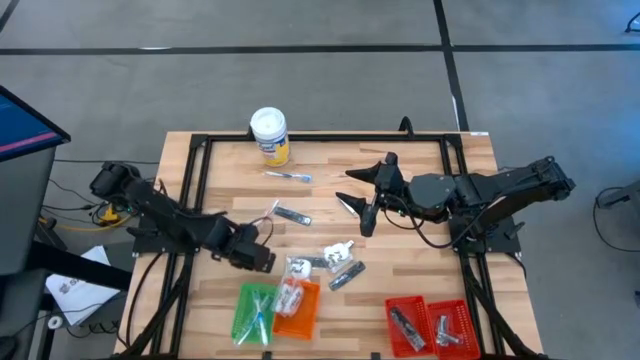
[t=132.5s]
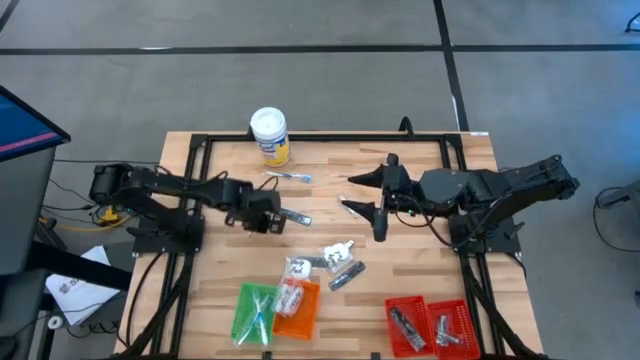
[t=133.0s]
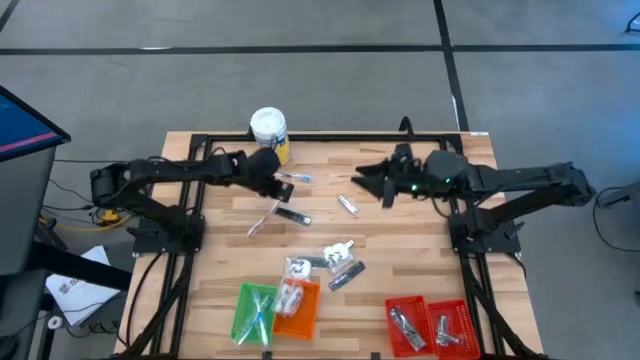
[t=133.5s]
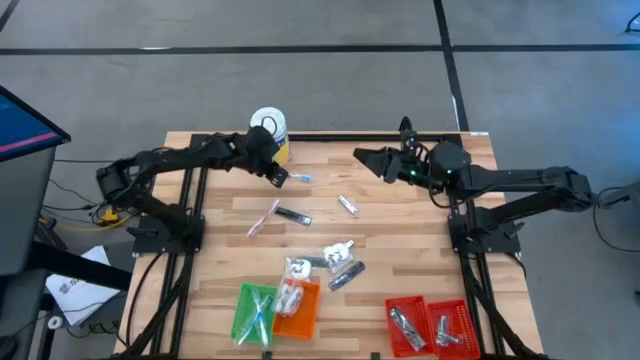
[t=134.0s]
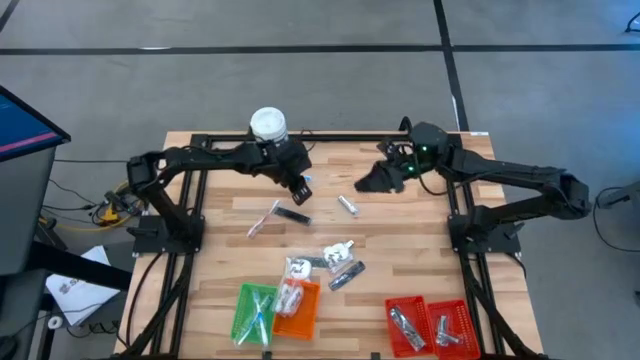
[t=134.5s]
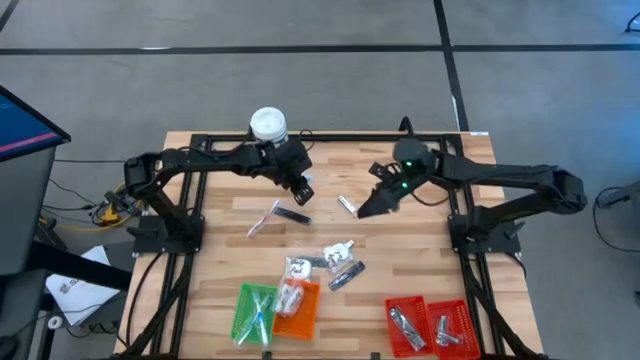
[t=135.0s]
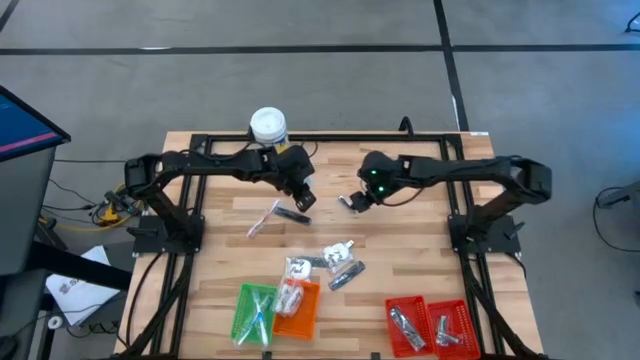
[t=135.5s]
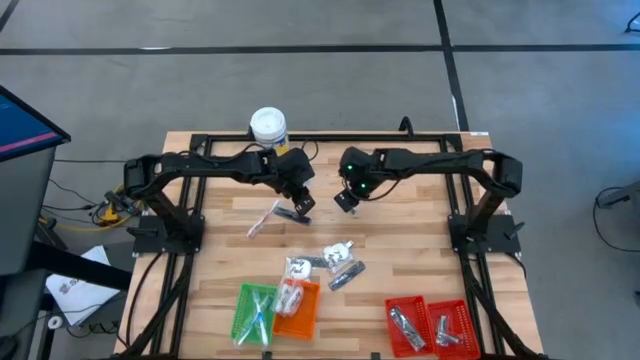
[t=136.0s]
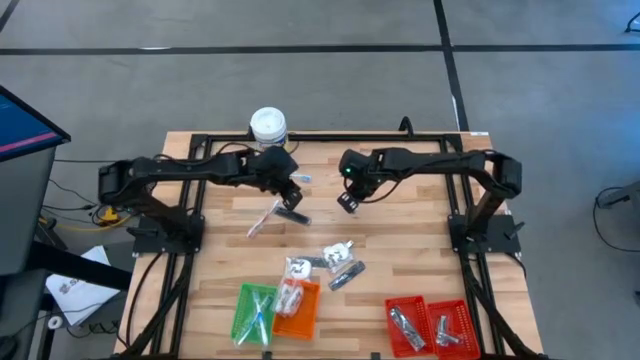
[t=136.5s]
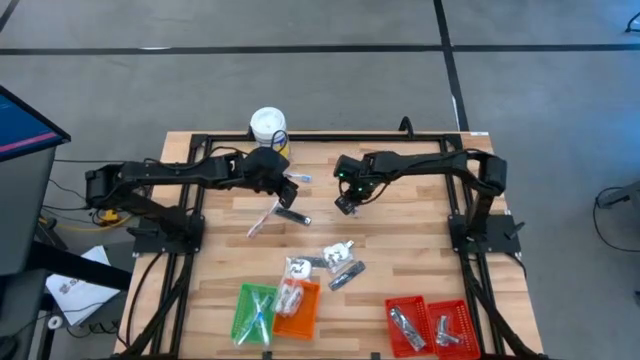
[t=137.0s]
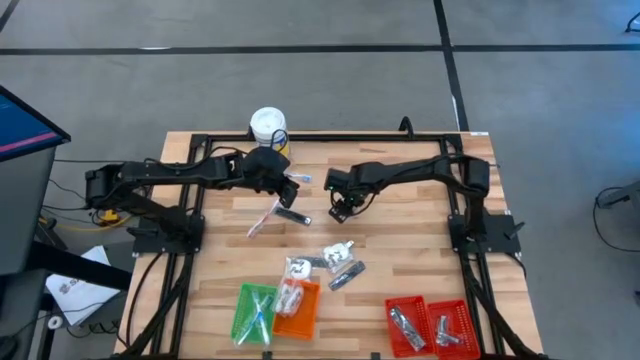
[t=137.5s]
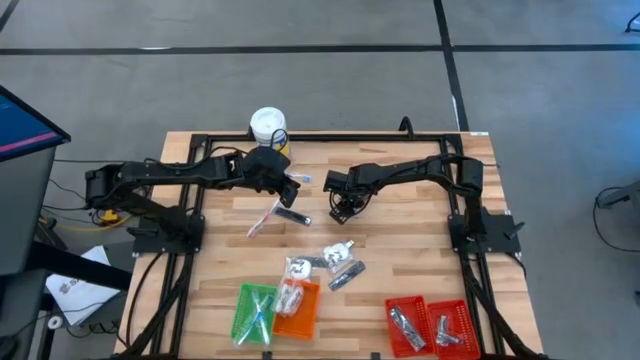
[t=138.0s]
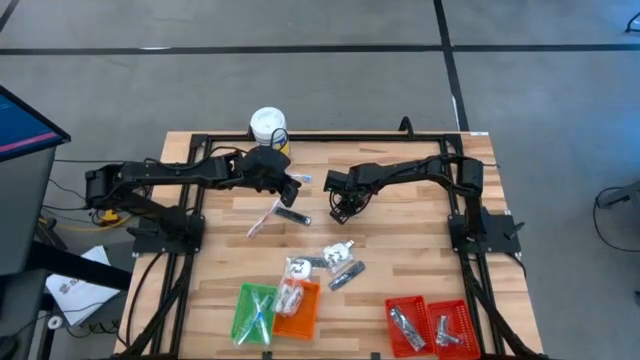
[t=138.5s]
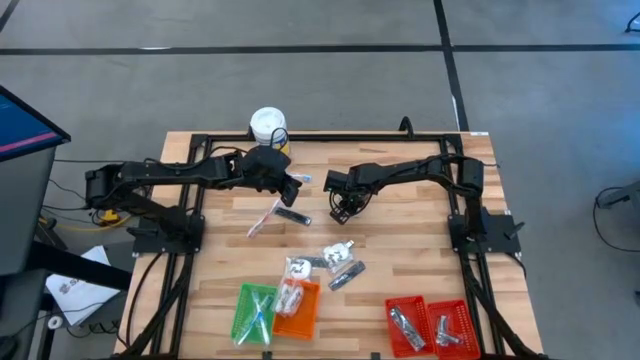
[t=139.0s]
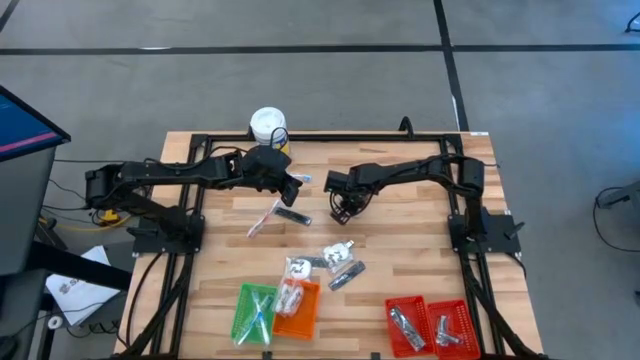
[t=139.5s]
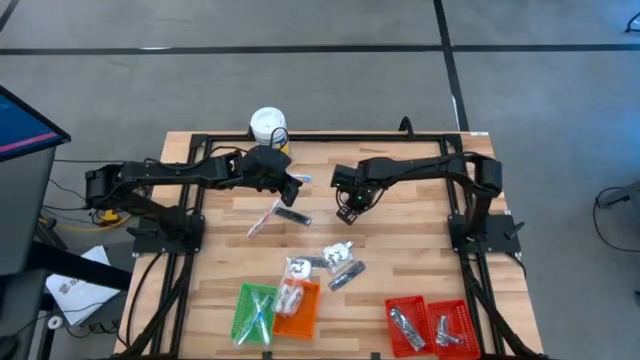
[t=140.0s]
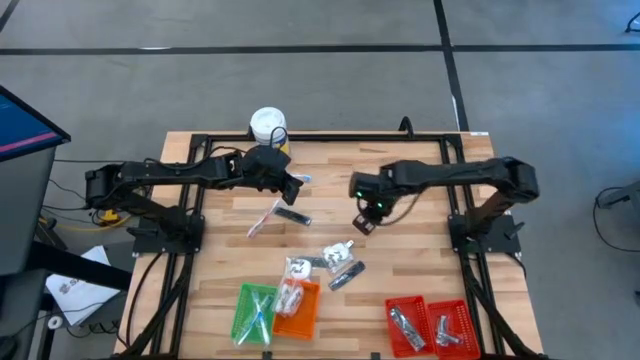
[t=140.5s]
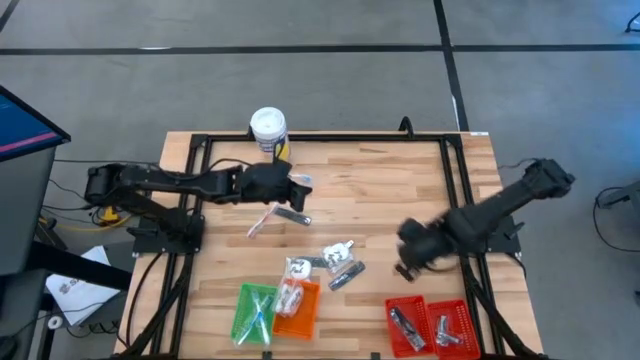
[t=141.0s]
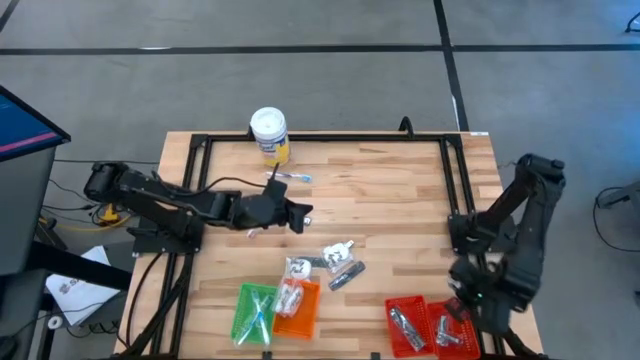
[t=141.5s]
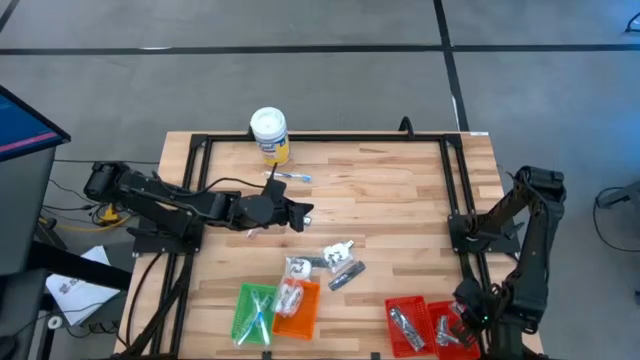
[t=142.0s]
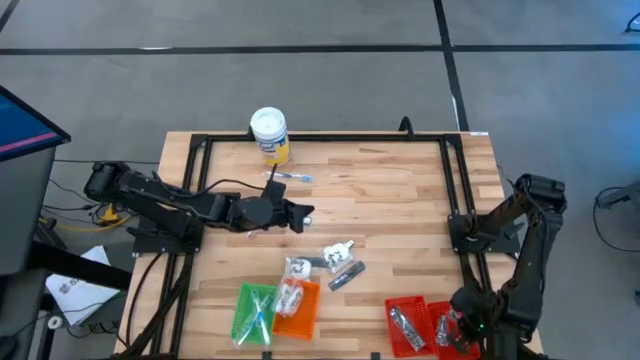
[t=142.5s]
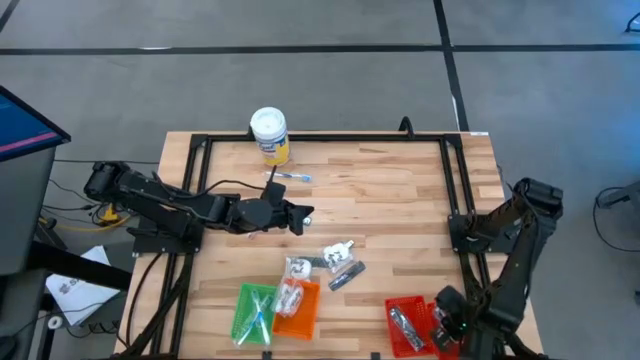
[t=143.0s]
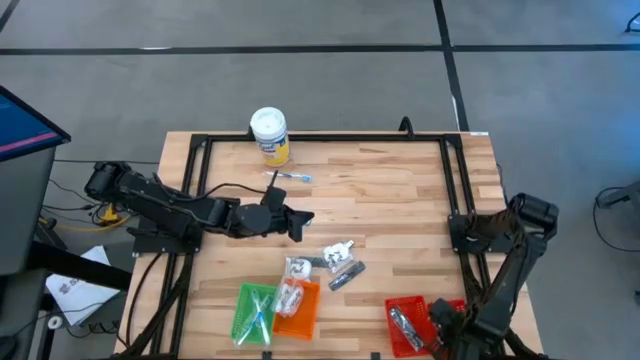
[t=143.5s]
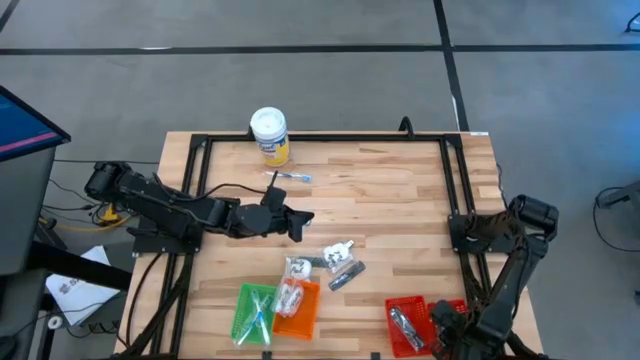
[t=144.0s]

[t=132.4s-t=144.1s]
Task: Pick & Place Travel size toiletries
Put the silver nail cutter into the right red basket

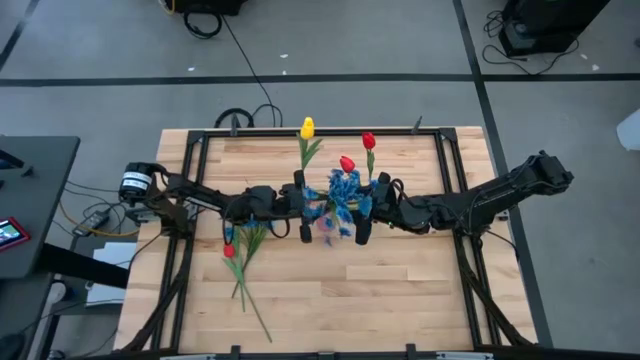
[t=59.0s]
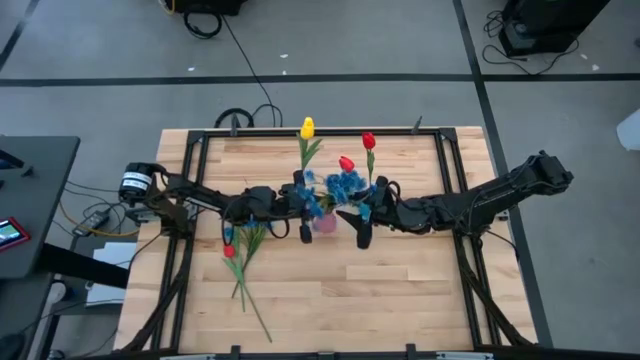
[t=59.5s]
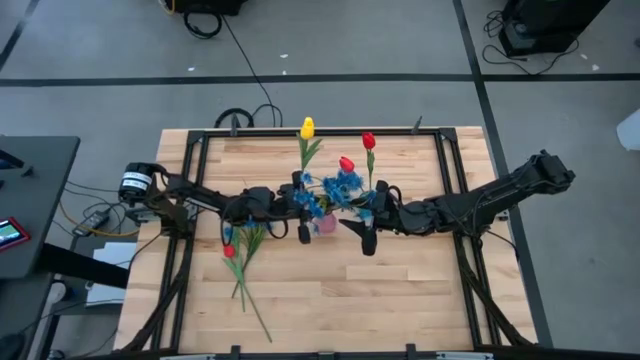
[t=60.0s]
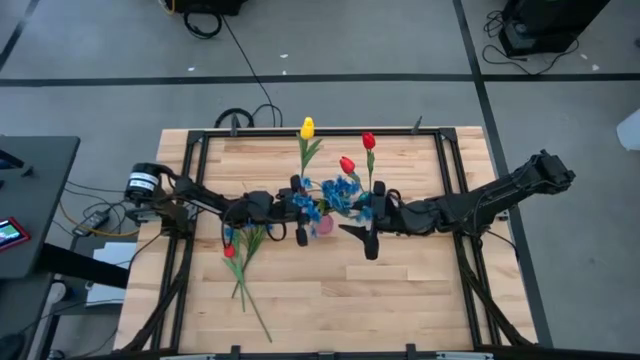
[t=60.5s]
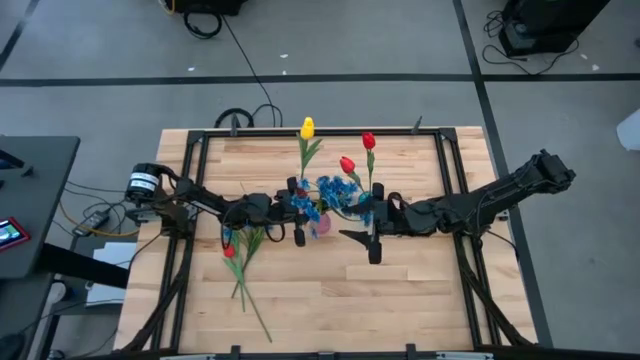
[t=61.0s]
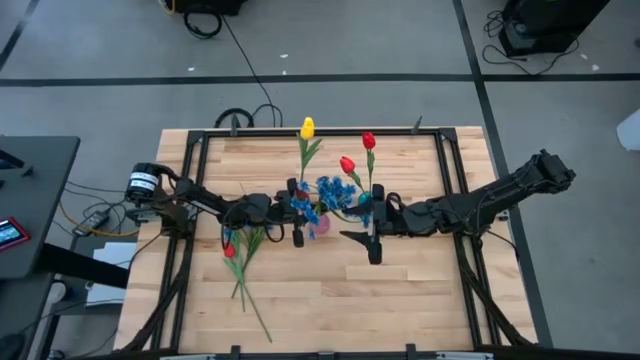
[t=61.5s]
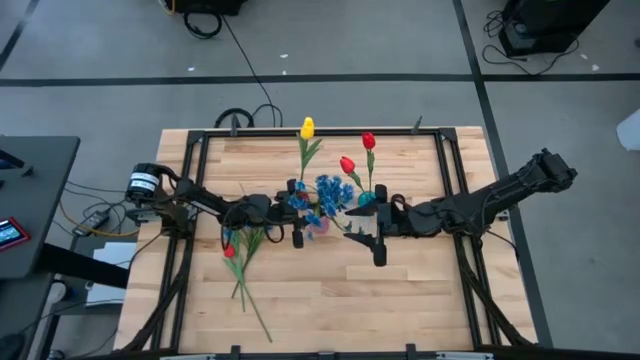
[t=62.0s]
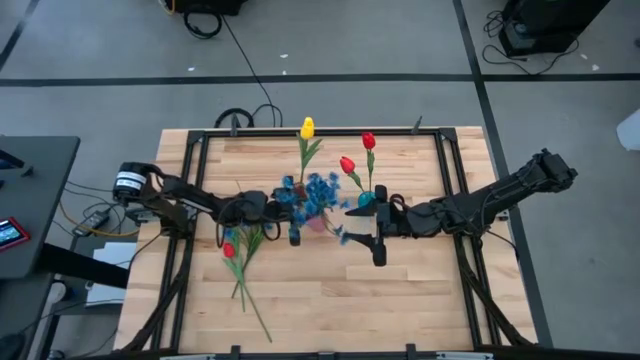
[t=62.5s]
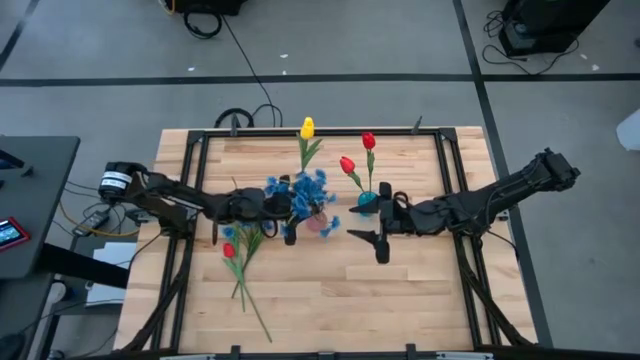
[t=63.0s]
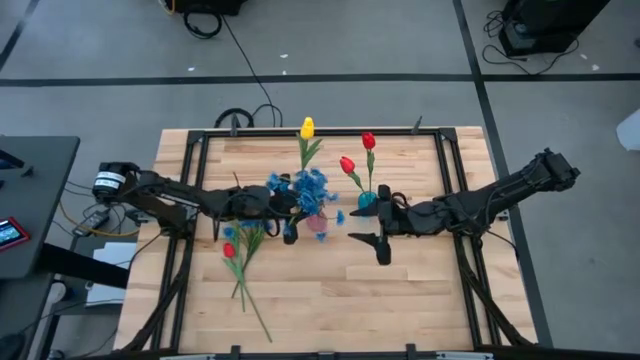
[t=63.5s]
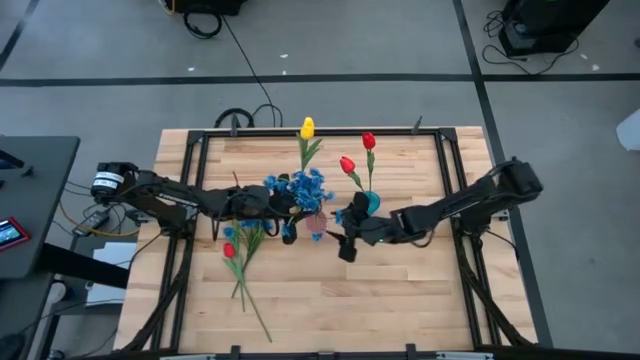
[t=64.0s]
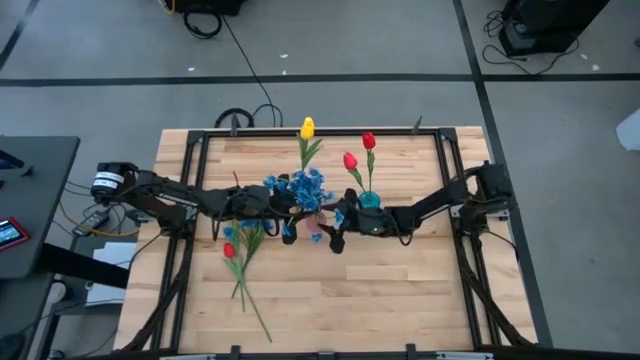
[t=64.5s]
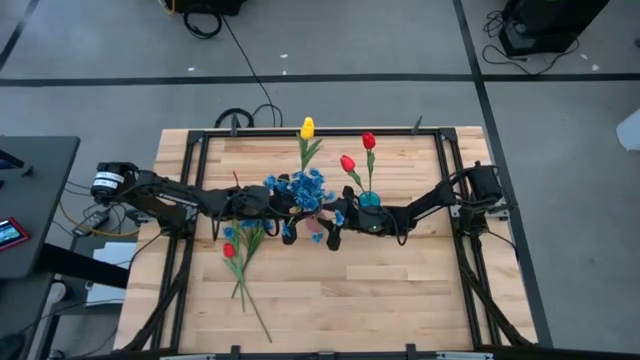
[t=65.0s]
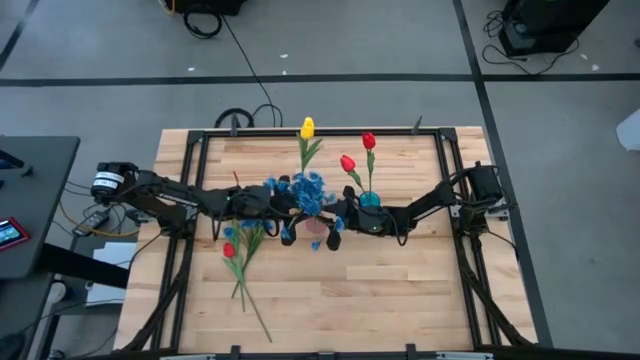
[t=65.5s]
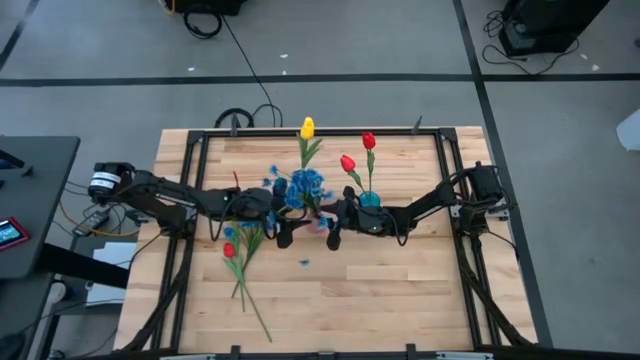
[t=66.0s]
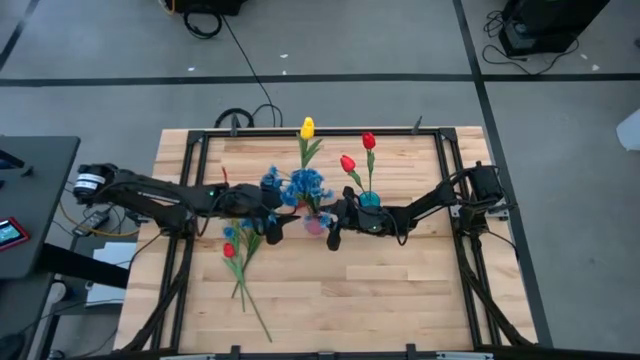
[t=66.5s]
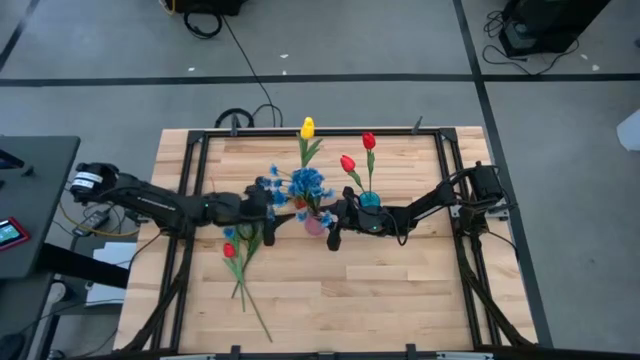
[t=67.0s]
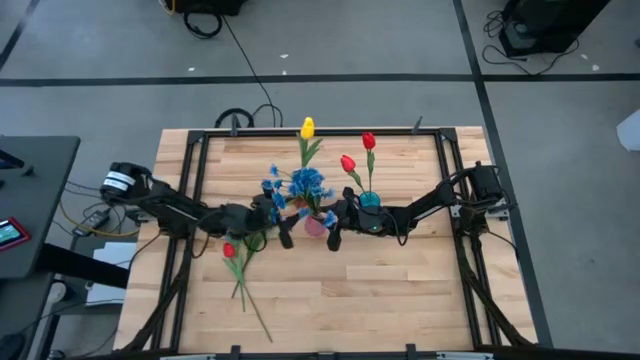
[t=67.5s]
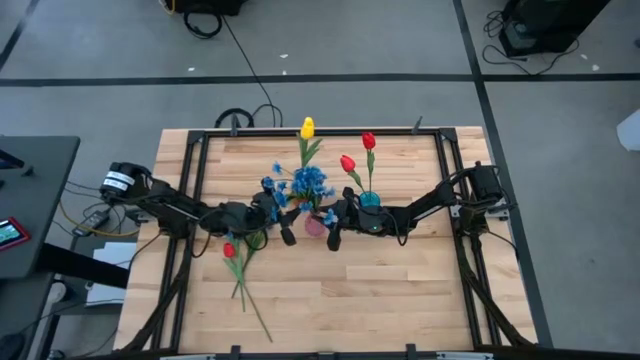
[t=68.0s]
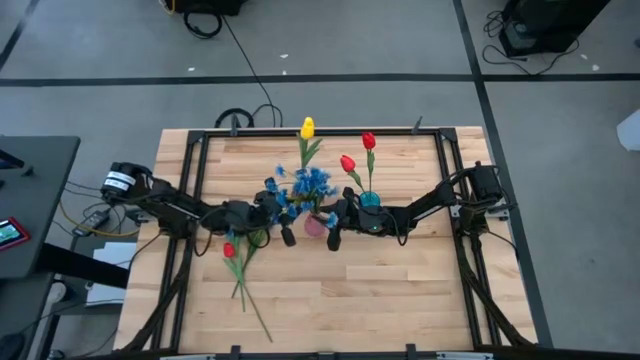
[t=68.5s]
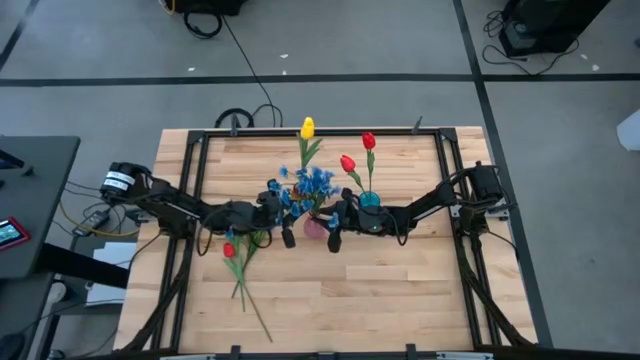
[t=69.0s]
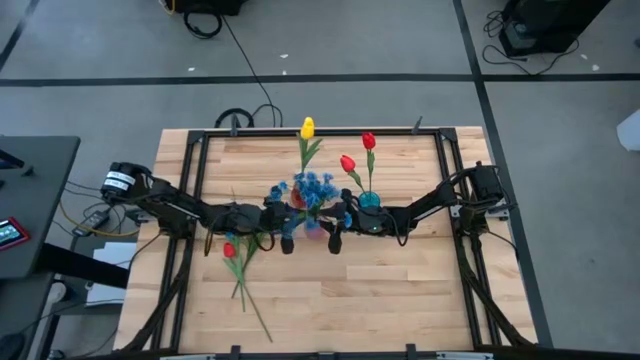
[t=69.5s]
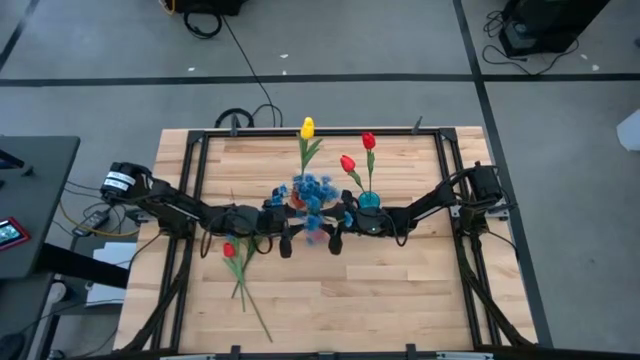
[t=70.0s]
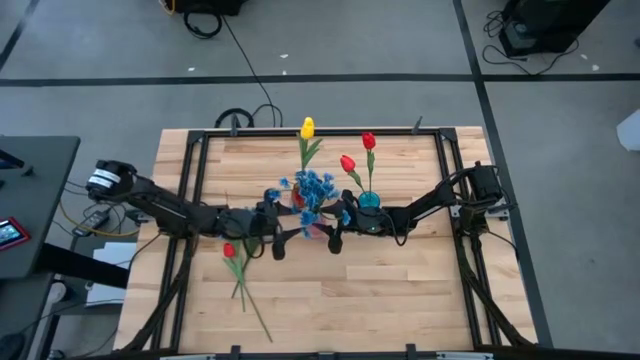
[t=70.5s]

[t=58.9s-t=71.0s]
Task: Sort flowers into vase by color
Put the blue flowers into the pink transparent vase
